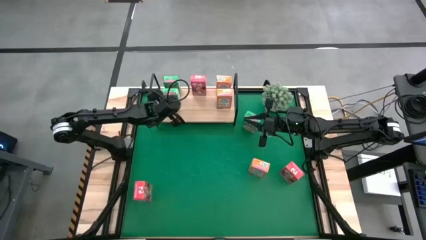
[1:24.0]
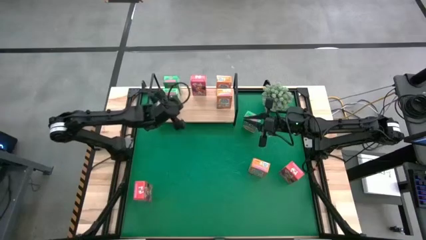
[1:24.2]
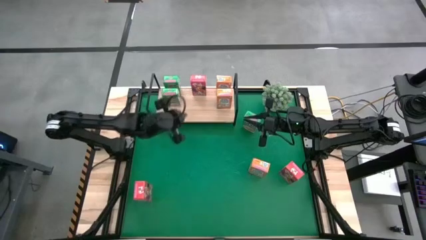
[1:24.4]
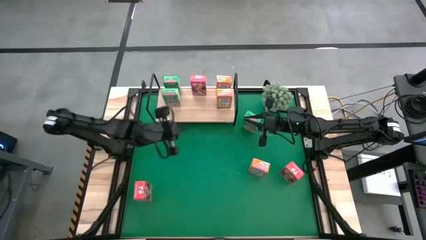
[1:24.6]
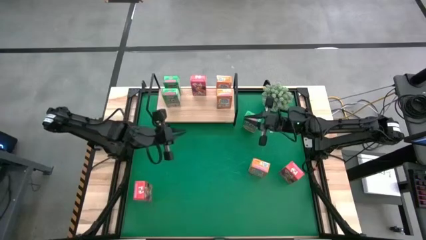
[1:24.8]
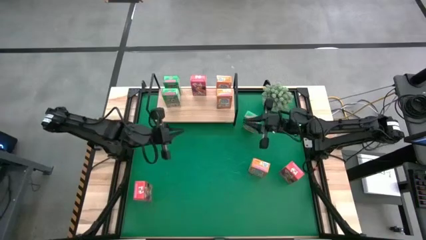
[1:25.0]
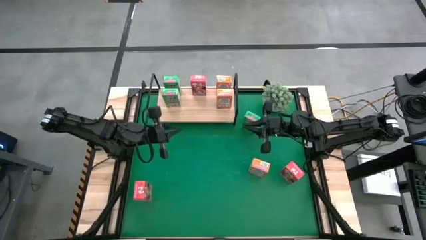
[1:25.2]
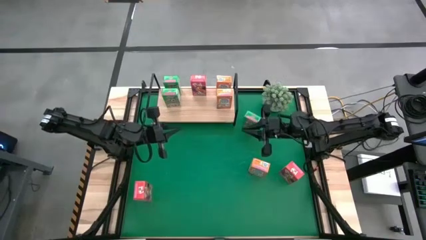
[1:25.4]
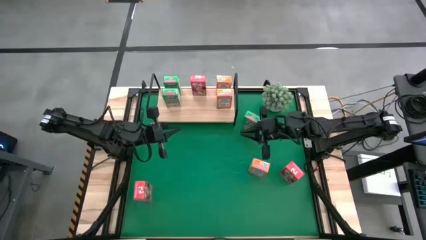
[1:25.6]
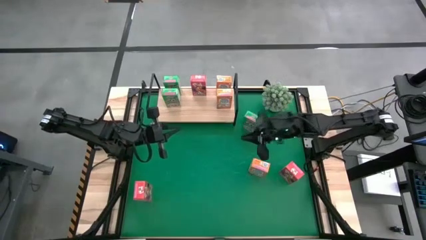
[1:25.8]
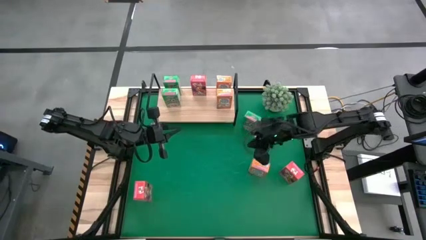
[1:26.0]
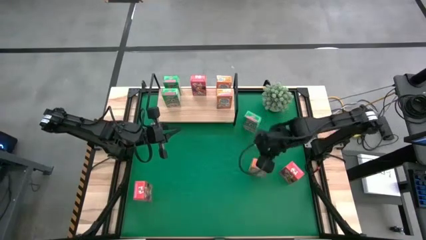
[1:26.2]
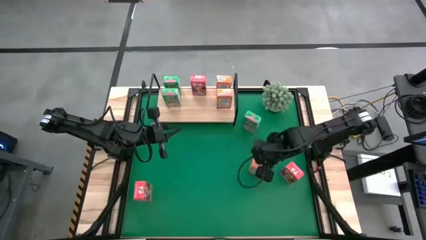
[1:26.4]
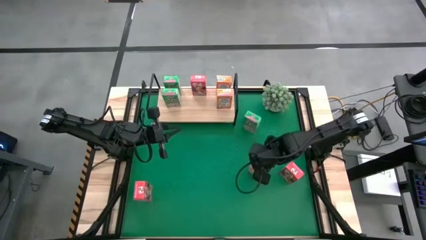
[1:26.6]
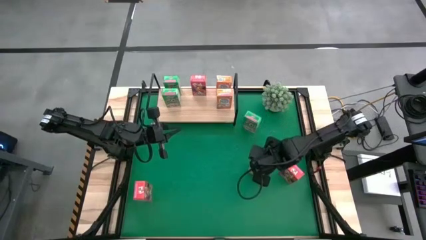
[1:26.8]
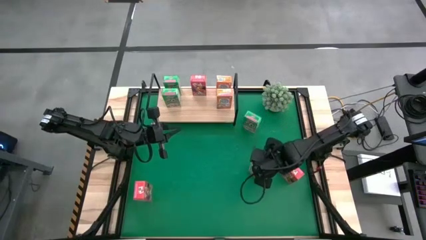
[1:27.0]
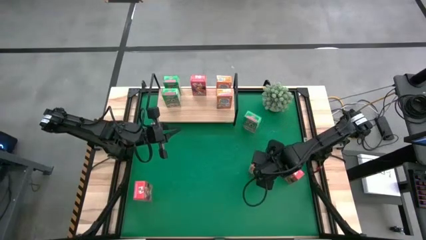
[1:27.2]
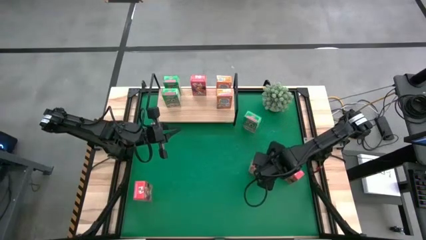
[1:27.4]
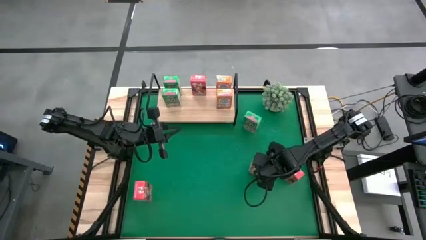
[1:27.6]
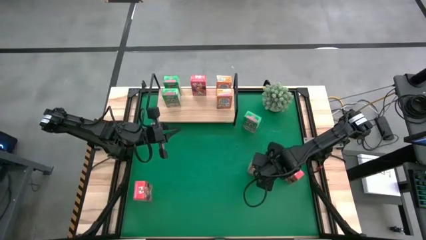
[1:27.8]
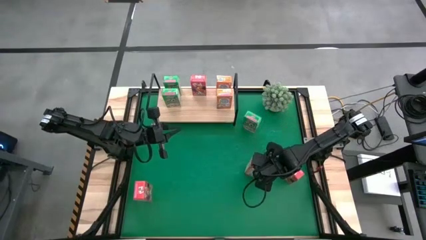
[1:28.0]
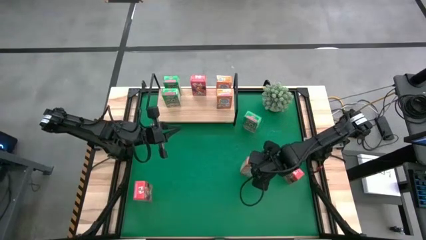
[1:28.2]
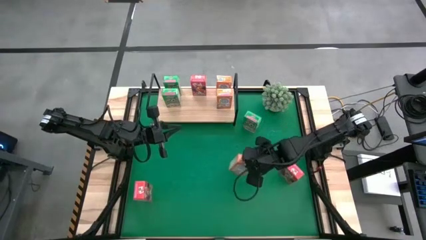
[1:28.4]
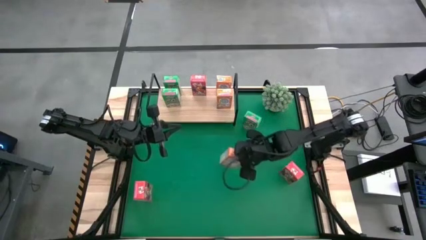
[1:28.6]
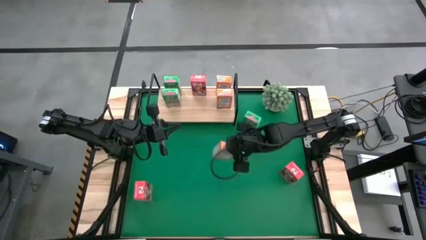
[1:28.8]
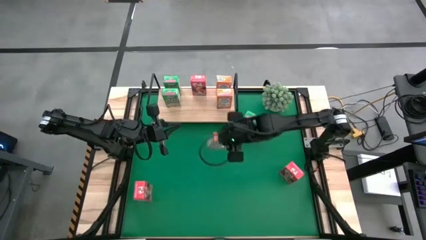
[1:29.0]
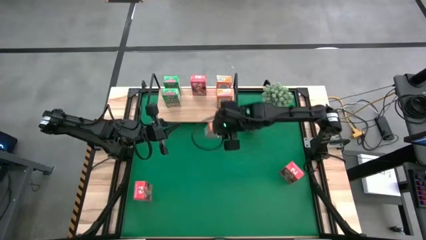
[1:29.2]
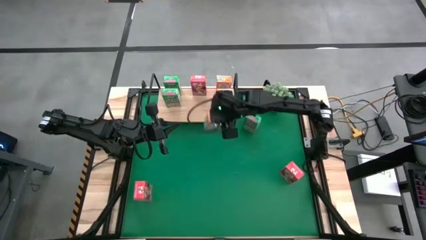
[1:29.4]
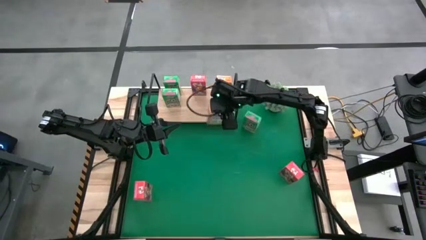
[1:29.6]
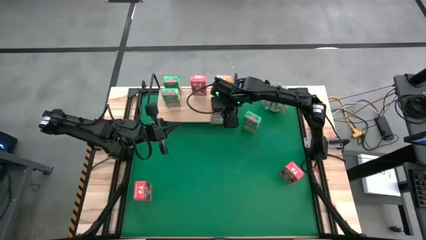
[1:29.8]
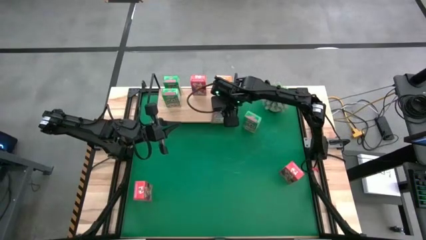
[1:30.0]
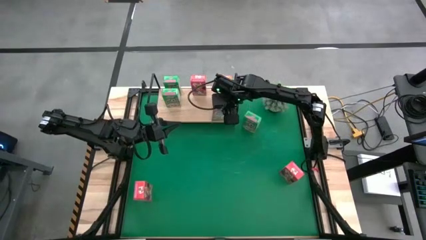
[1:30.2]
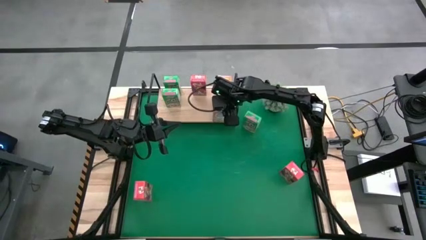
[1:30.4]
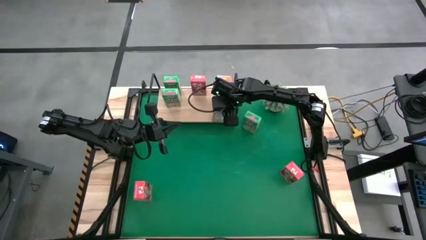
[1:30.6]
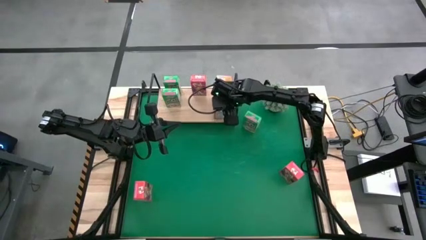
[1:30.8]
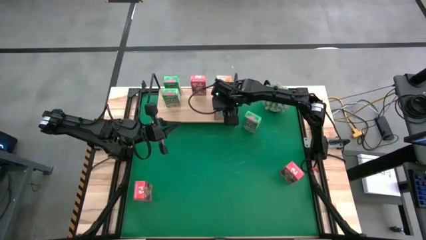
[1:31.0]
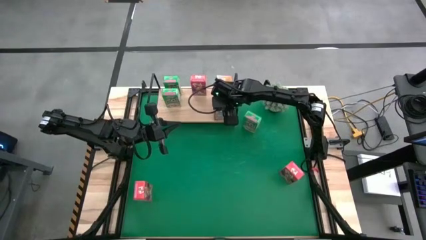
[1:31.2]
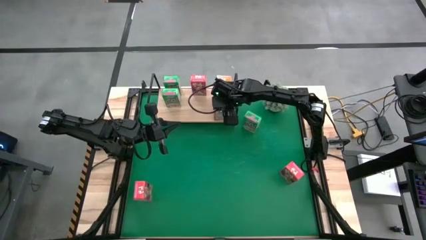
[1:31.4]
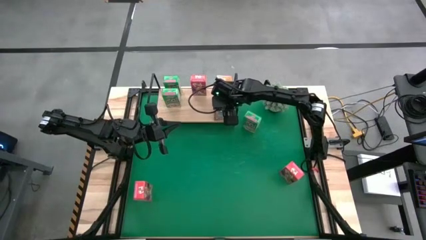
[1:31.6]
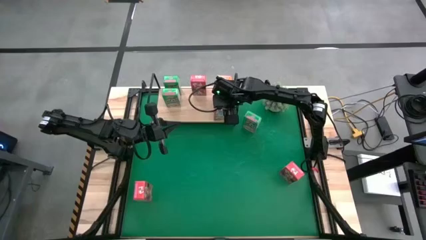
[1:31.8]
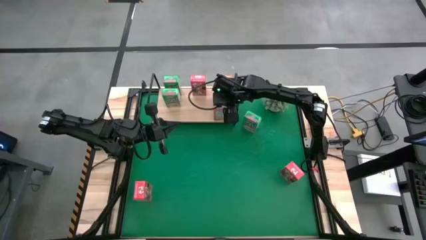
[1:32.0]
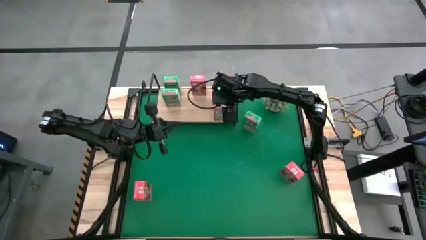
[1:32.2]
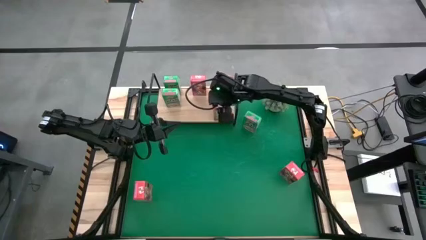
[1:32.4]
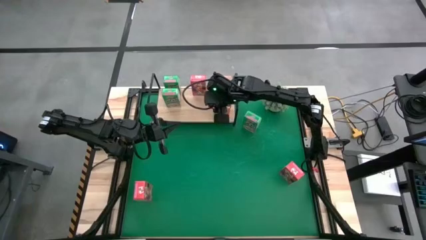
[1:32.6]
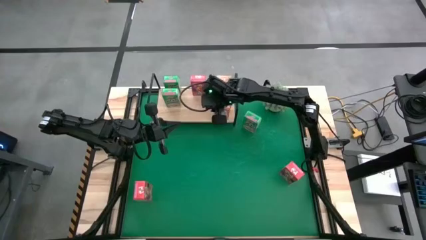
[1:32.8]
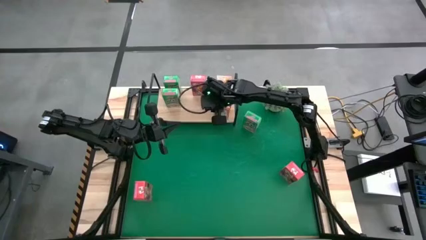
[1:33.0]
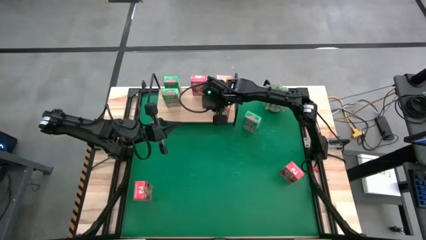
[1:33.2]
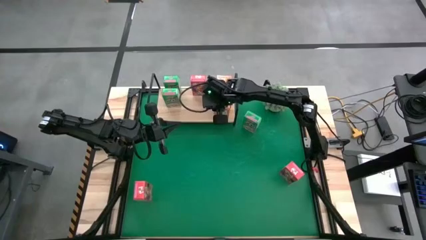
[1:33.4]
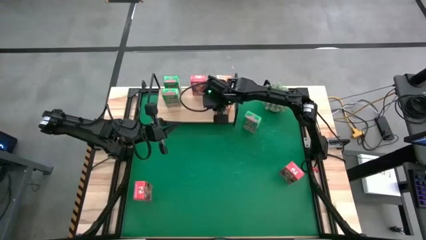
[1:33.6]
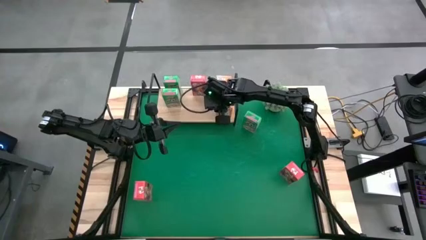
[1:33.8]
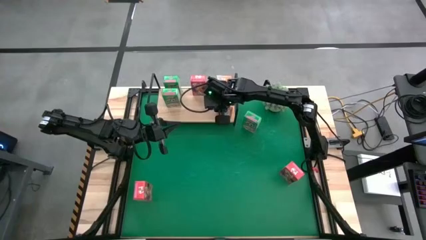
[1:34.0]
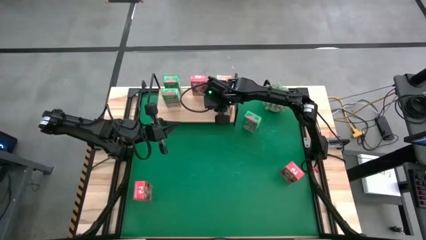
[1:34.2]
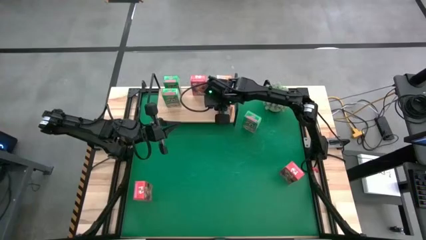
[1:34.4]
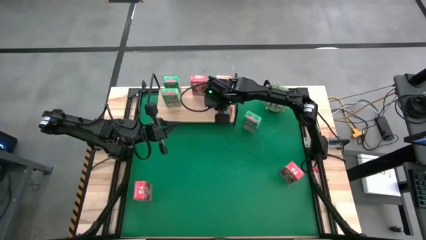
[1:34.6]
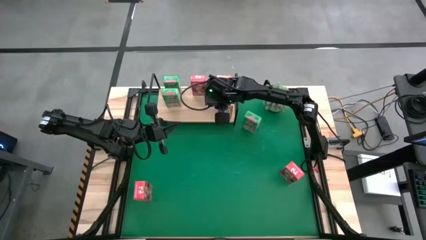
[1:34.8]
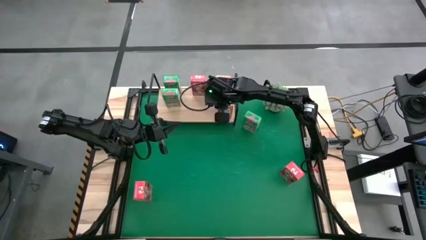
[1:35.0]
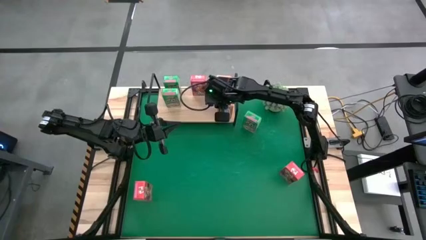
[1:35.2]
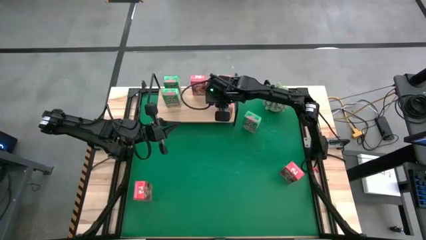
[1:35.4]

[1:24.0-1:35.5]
Task: Stack cereal on shelf
Put the orange cereal box aligned with the other orange cereal box on the shelf

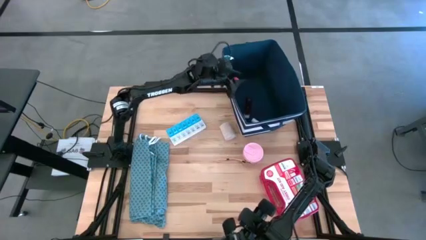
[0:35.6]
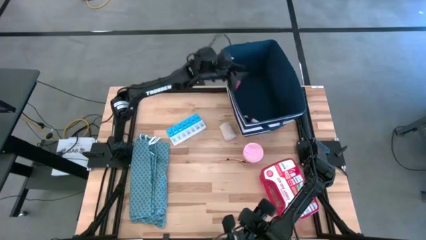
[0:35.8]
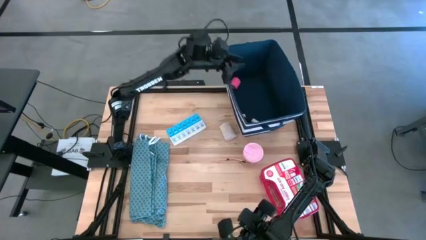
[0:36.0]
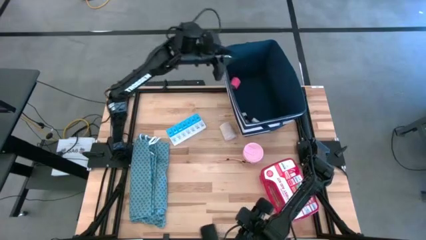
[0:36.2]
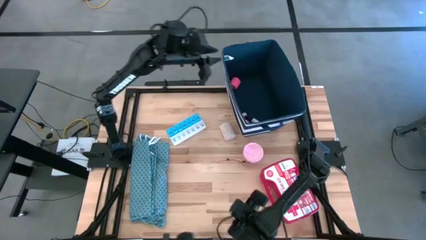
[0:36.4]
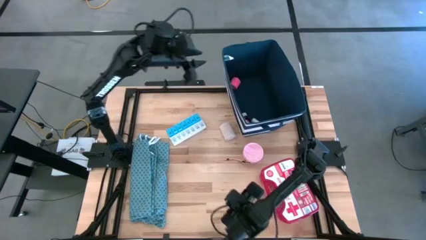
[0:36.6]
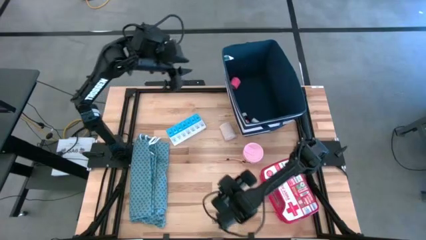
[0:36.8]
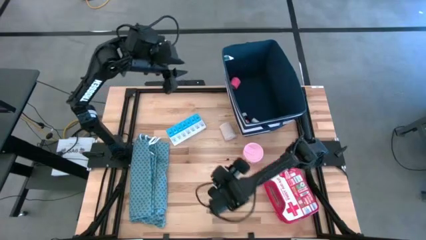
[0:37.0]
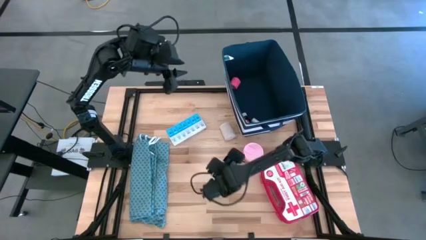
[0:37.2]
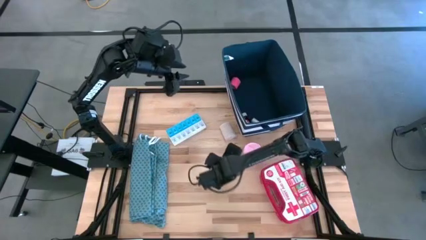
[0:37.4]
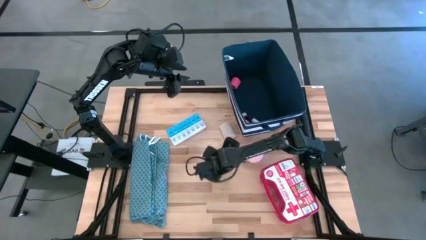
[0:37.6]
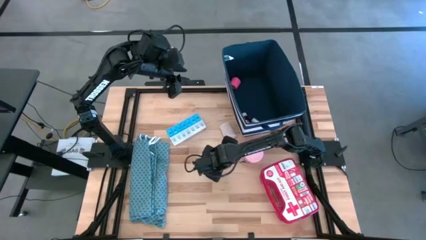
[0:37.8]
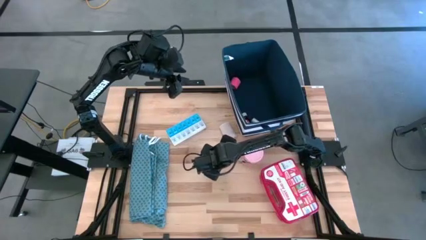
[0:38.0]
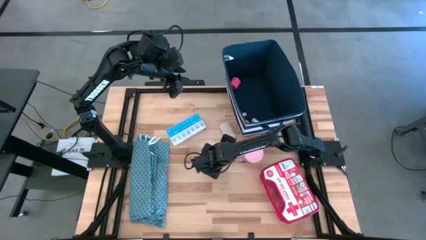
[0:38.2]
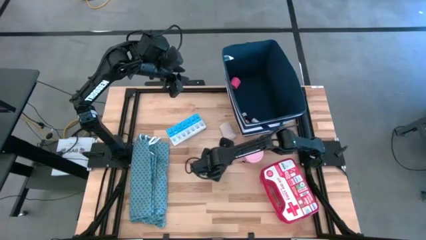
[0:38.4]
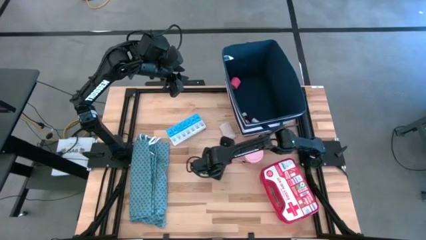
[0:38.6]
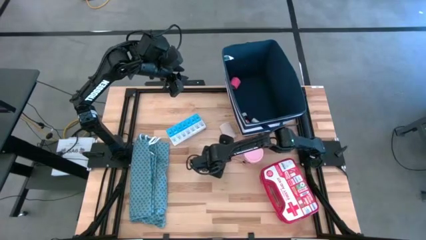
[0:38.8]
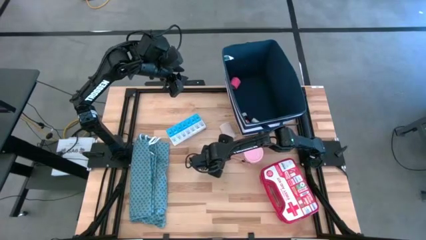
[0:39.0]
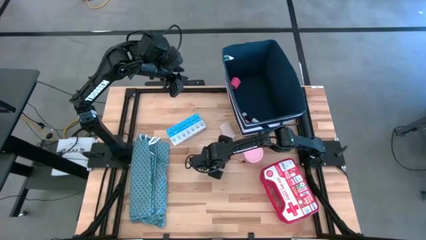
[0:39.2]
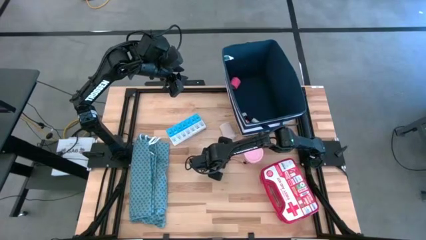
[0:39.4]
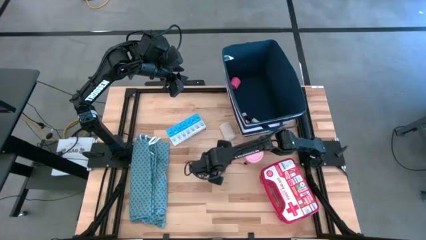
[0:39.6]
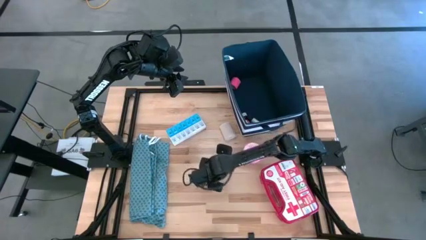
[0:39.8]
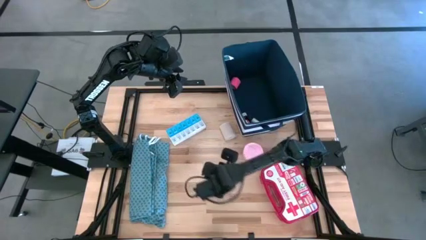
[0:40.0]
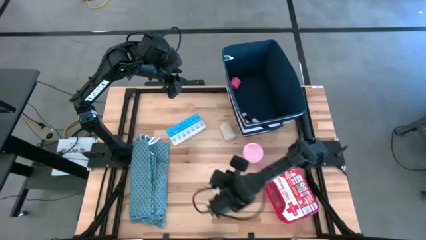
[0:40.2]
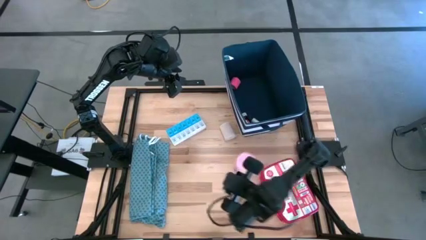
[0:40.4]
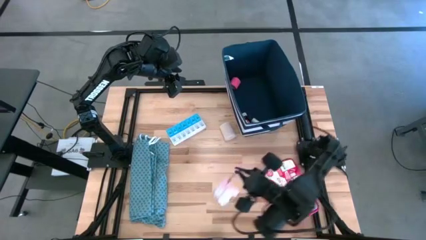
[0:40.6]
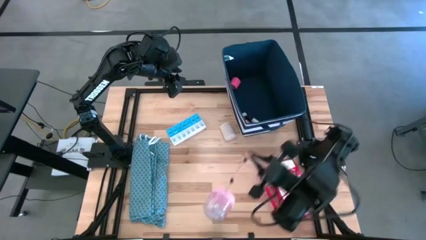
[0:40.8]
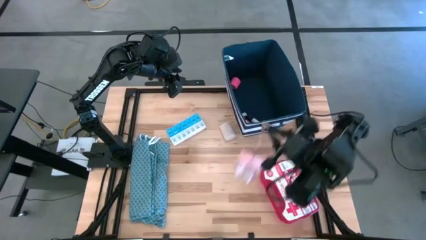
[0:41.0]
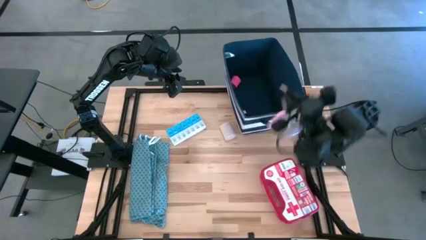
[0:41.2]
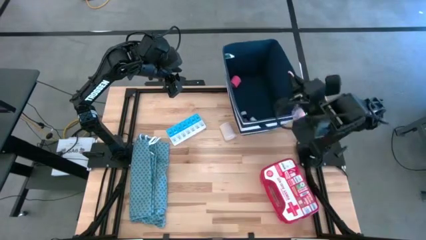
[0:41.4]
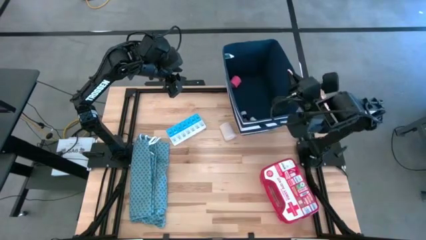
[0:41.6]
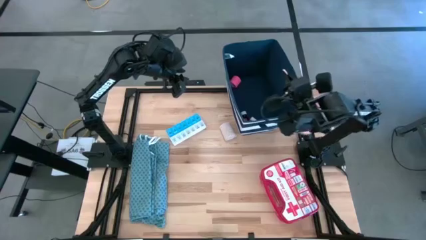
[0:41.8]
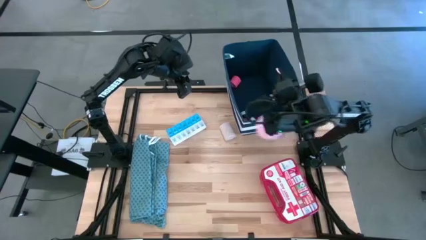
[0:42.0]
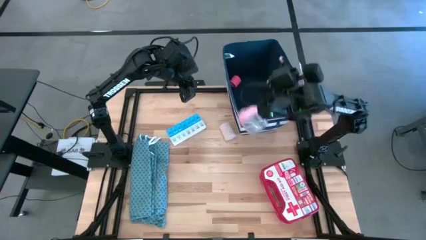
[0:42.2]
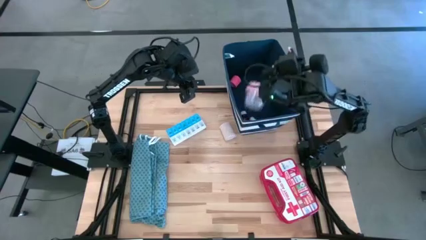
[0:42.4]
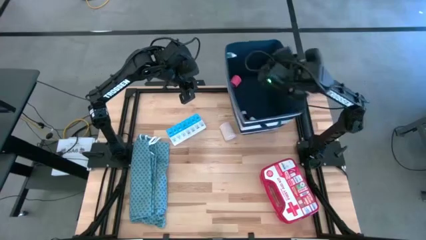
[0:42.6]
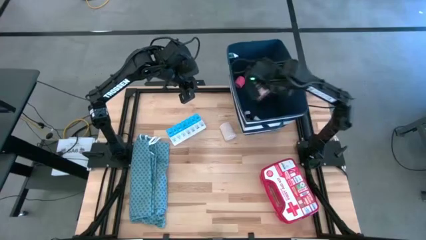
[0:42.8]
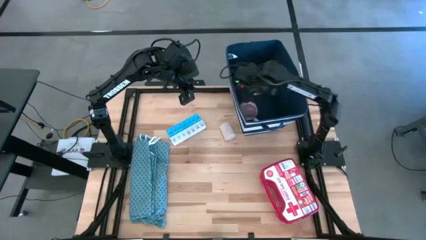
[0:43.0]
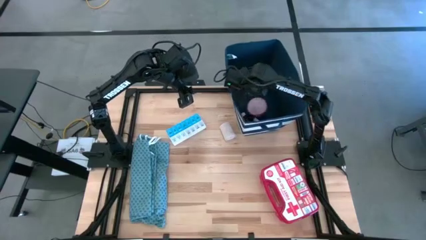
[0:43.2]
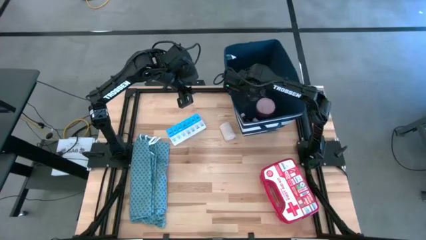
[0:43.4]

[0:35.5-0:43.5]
Task: Pick & place medical supplies in basket/bin
Put the pink container into the blue bin
